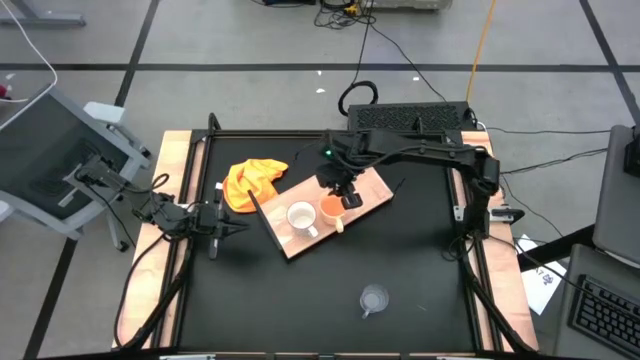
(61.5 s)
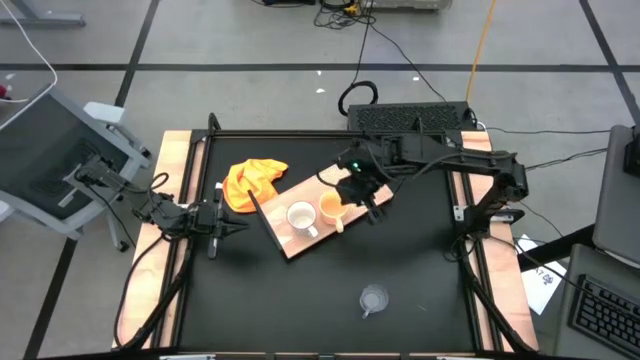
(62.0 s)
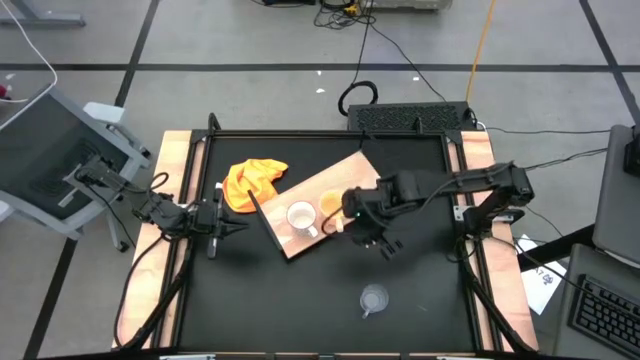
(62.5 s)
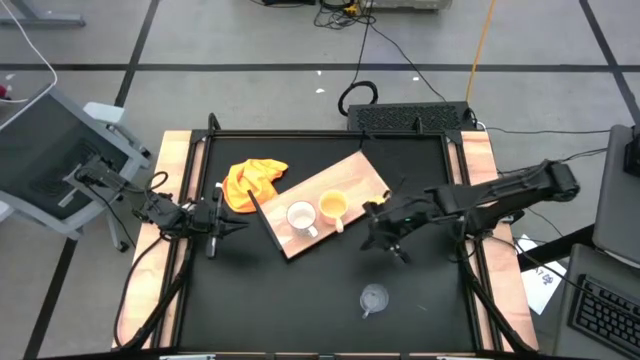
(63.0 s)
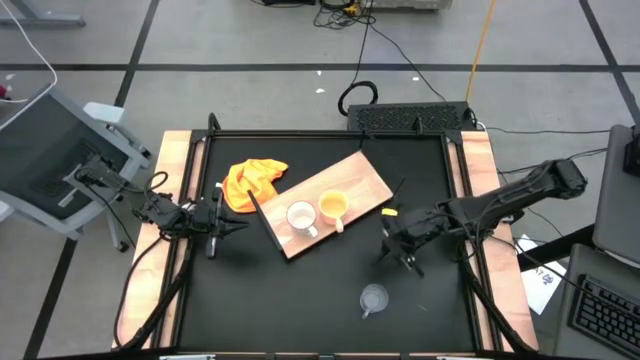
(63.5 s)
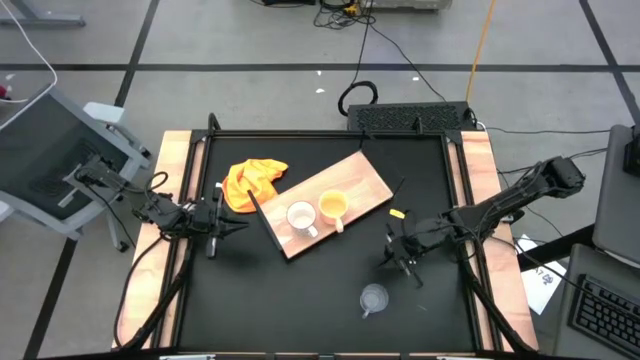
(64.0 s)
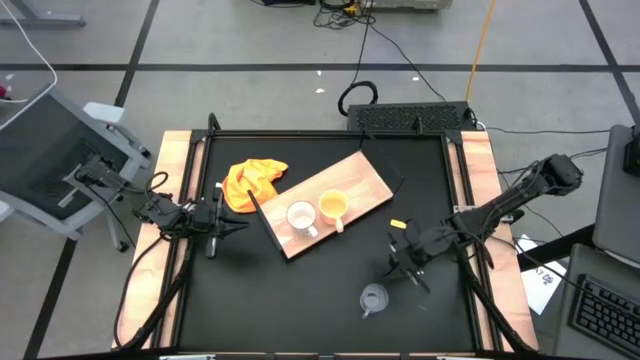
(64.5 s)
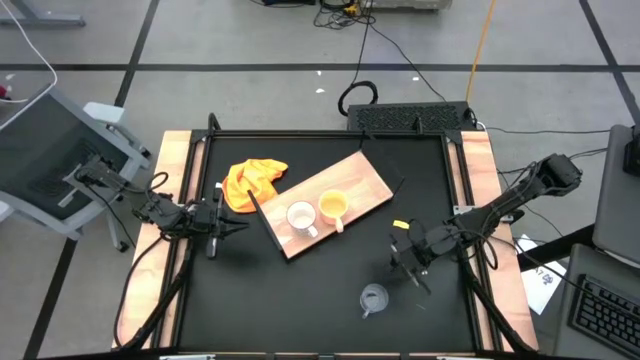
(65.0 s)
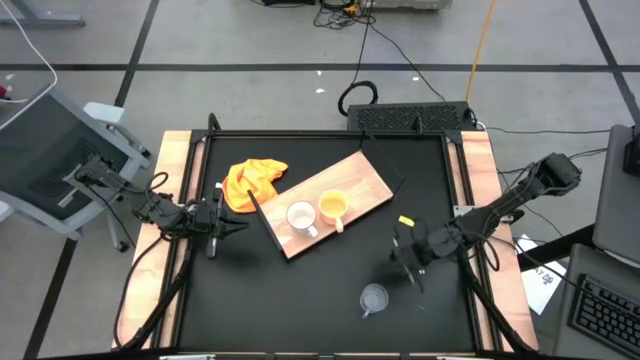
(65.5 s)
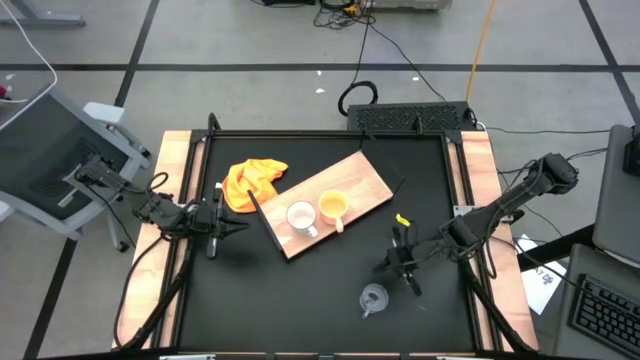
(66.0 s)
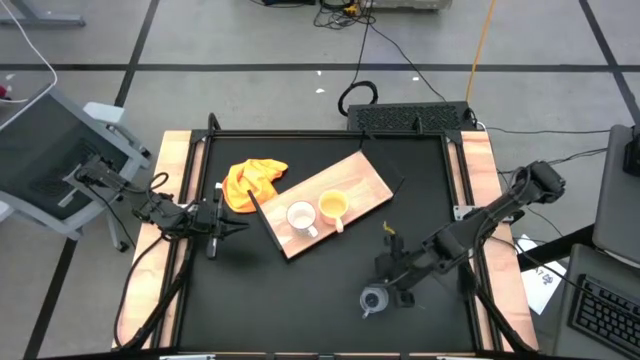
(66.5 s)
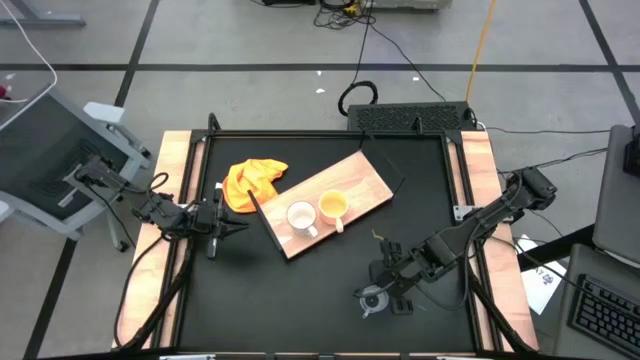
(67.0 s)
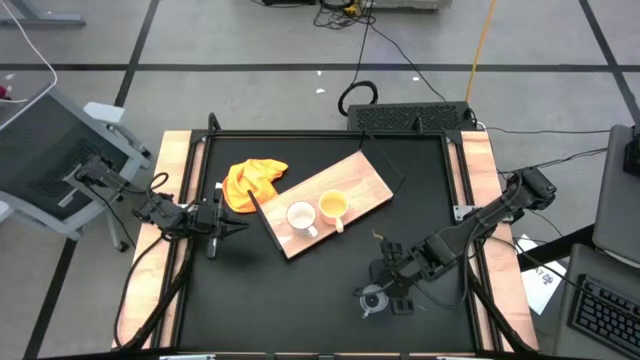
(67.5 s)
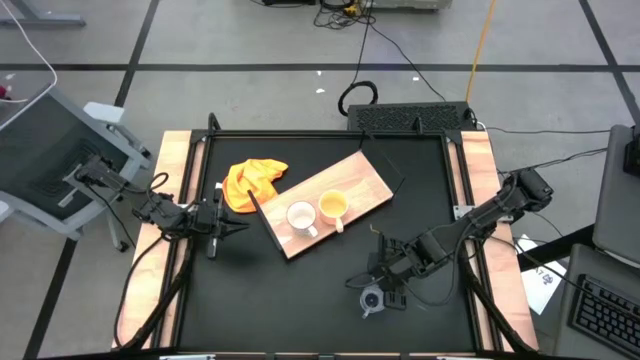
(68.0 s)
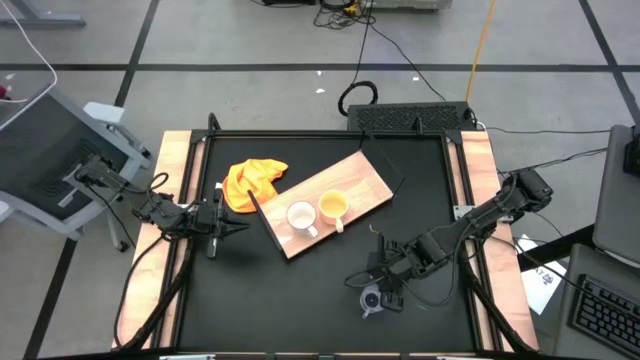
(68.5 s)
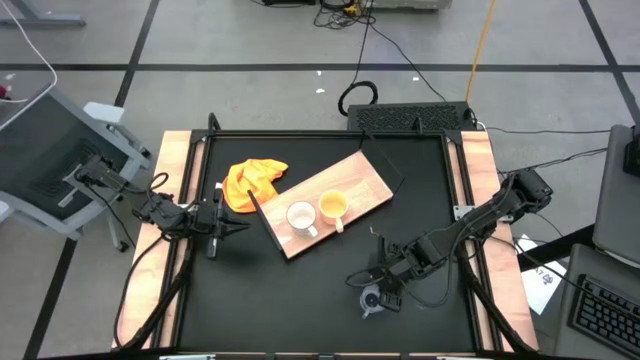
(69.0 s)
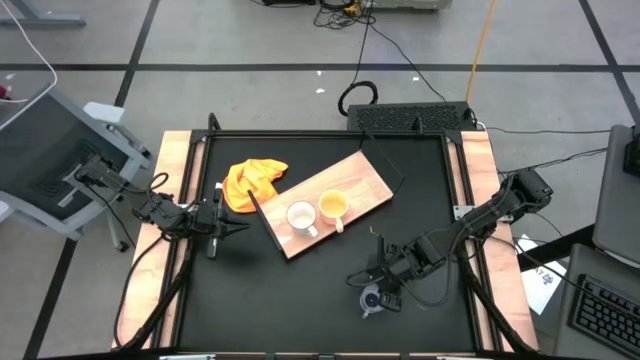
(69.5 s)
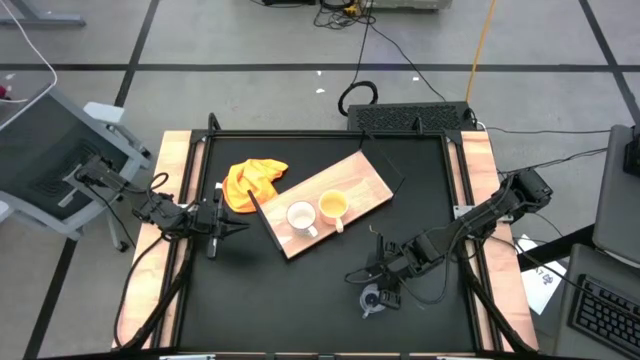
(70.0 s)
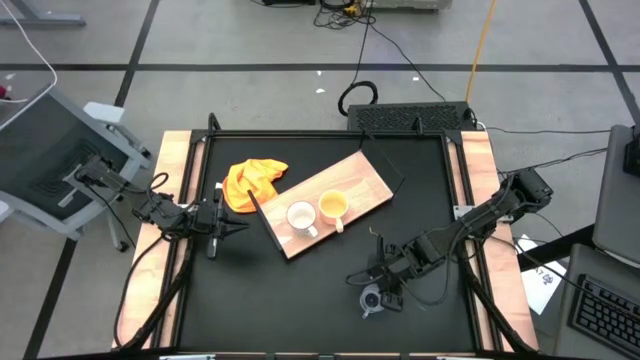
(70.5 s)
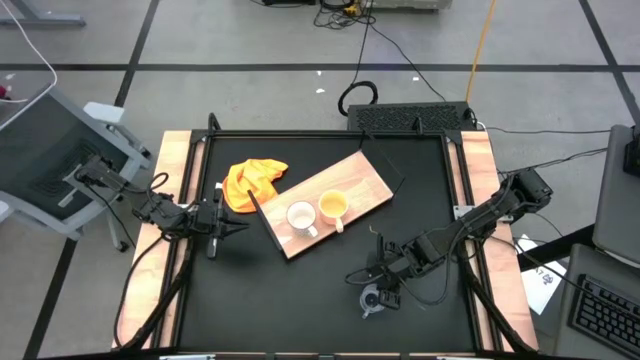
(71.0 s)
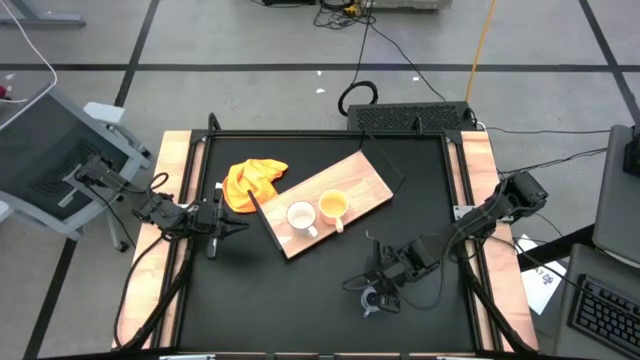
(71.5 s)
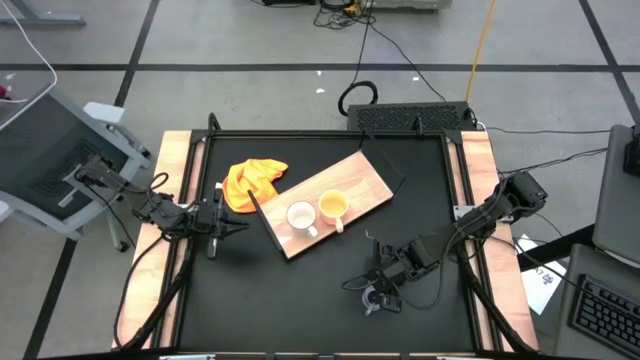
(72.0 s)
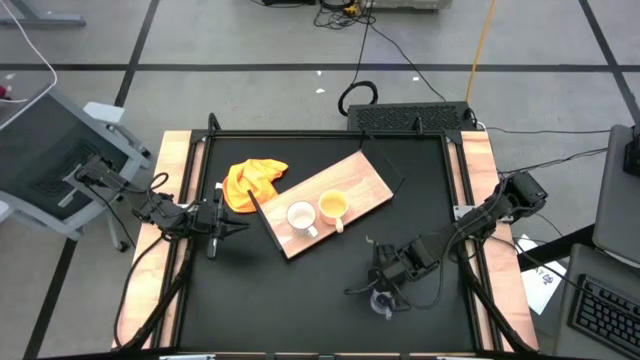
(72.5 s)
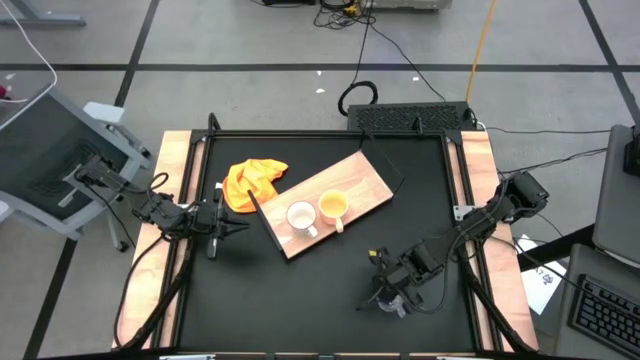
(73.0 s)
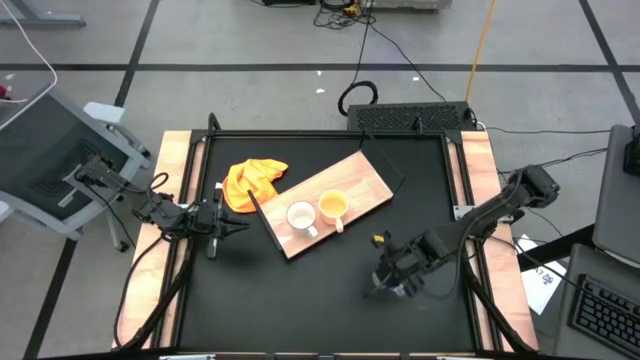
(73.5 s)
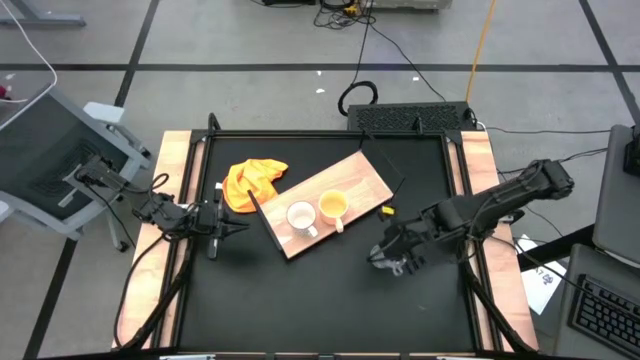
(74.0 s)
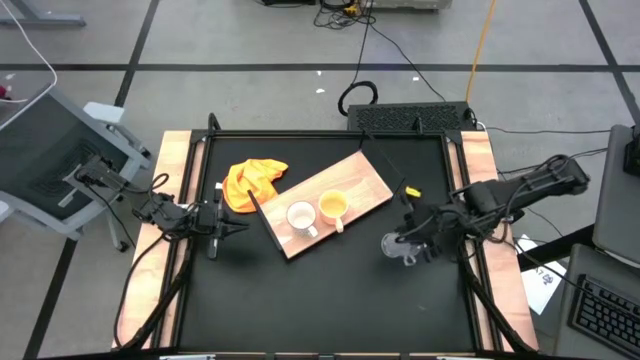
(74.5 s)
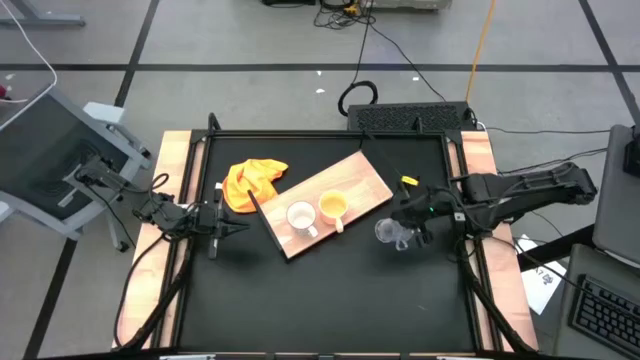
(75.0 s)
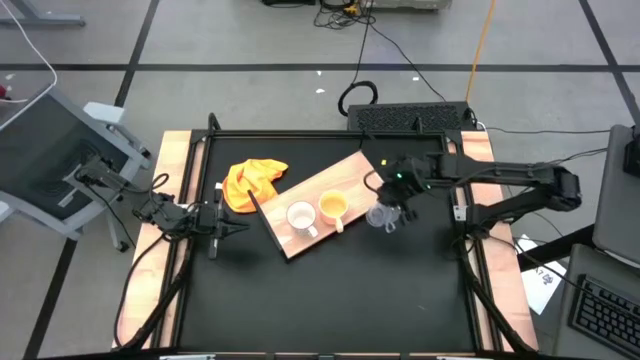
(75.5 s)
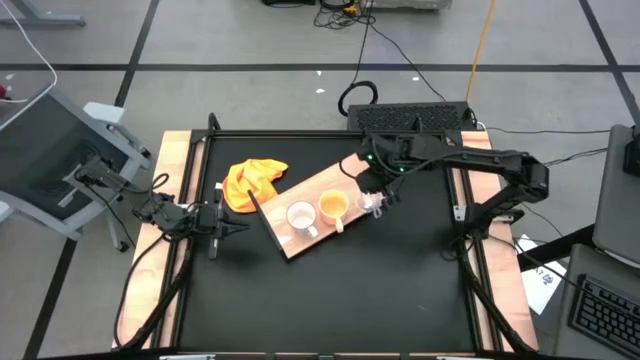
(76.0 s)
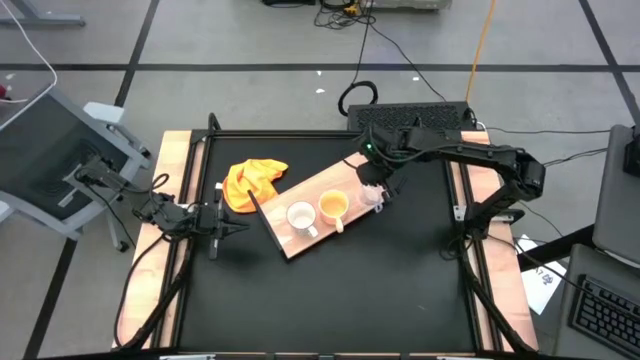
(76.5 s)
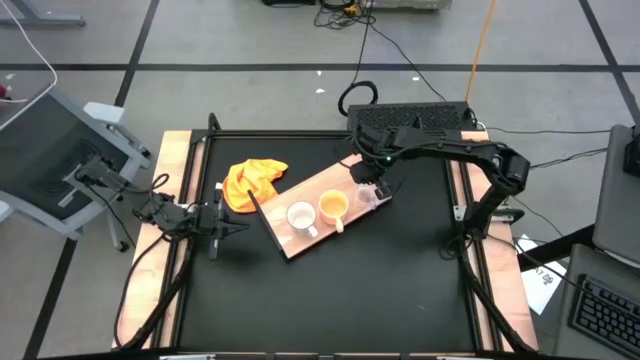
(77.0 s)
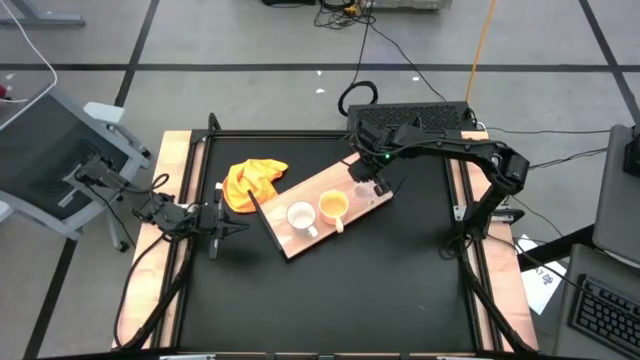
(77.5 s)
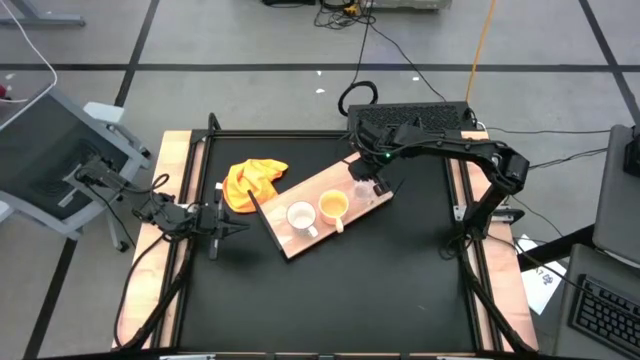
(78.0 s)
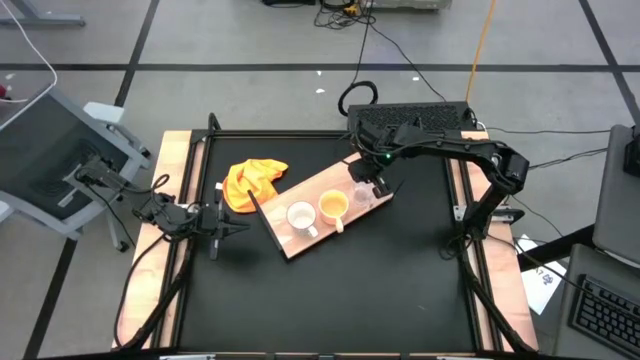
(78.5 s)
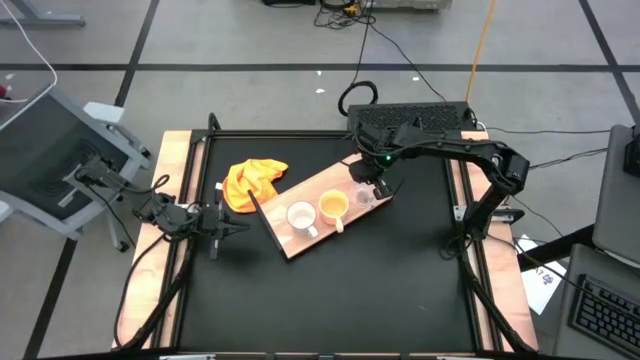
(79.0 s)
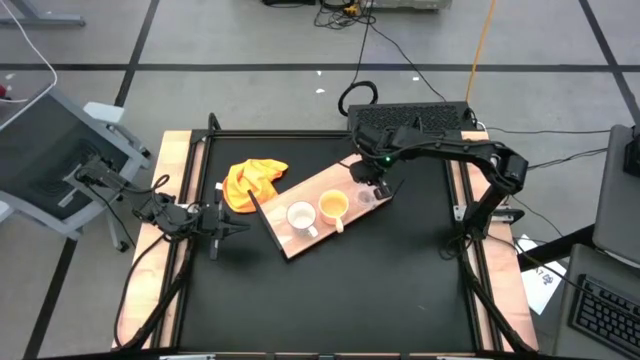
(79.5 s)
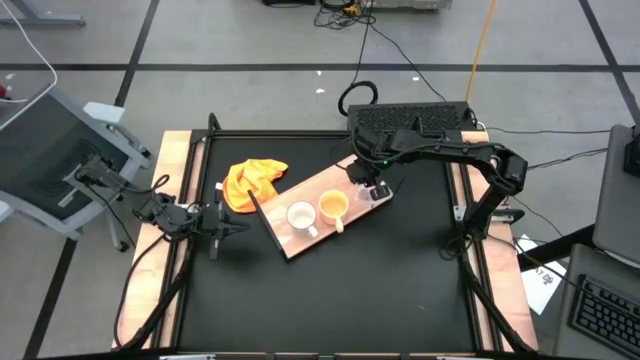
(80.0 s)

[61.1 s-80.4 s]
Task: Stack small to large cups/mugs on shelf
Put the transparent mug on the shelf
